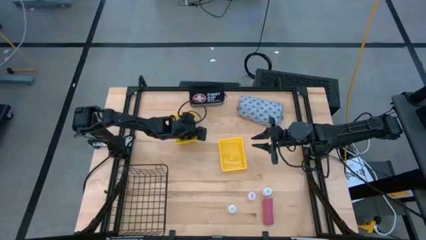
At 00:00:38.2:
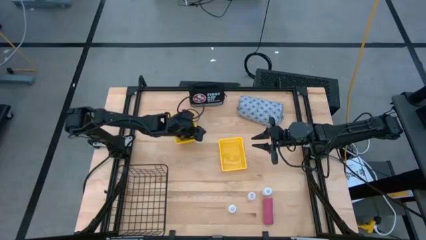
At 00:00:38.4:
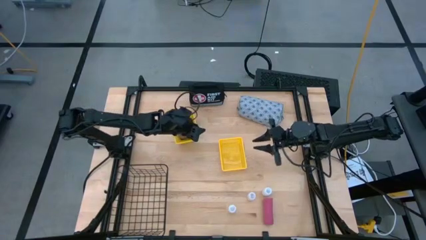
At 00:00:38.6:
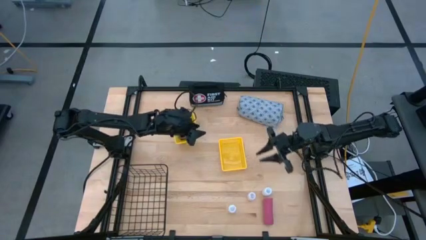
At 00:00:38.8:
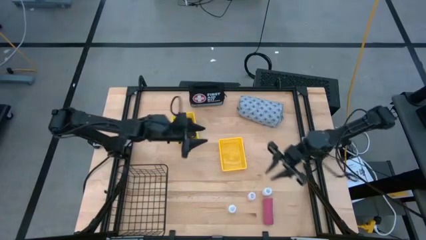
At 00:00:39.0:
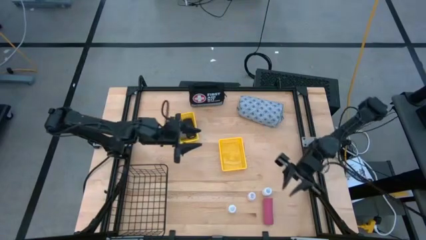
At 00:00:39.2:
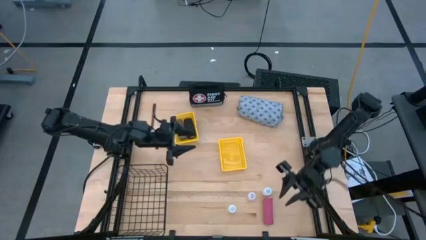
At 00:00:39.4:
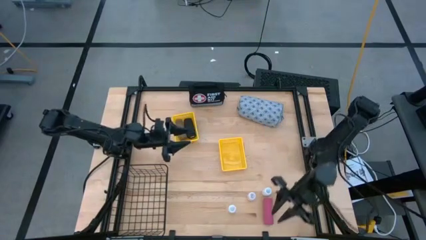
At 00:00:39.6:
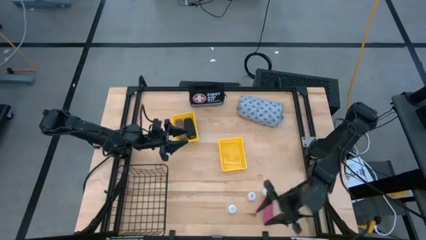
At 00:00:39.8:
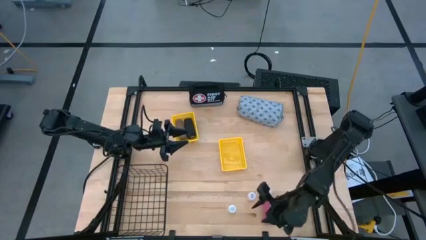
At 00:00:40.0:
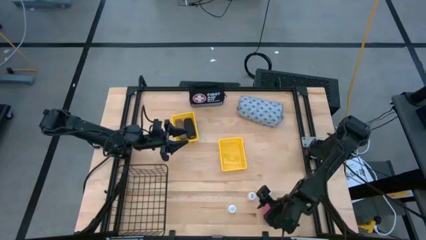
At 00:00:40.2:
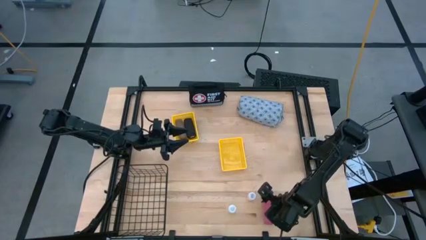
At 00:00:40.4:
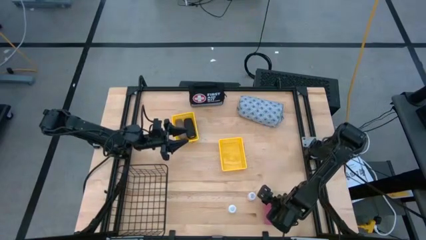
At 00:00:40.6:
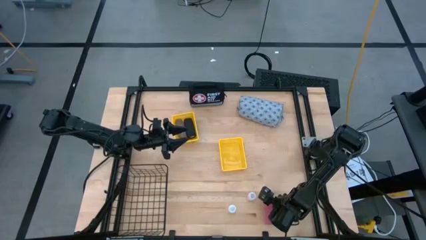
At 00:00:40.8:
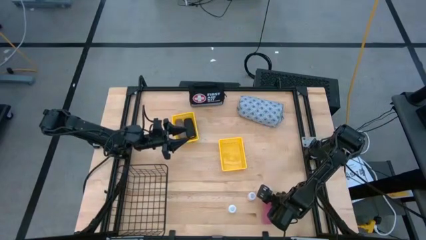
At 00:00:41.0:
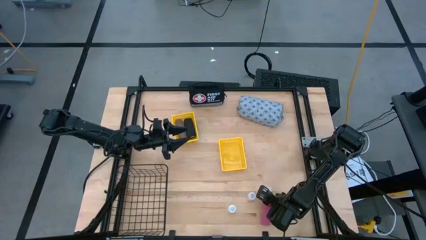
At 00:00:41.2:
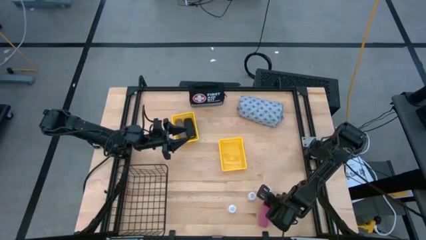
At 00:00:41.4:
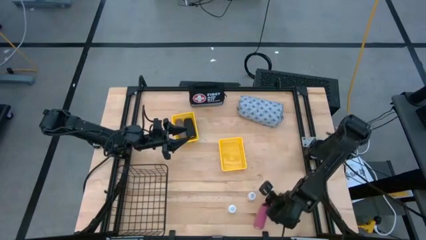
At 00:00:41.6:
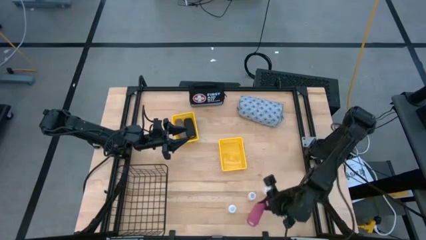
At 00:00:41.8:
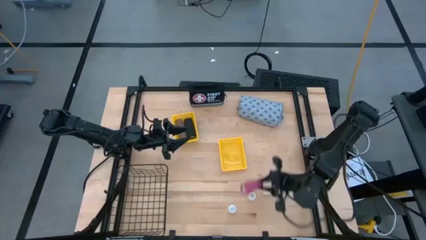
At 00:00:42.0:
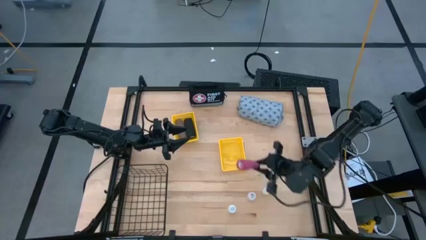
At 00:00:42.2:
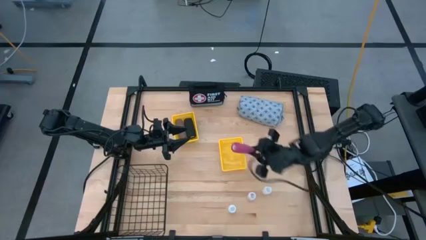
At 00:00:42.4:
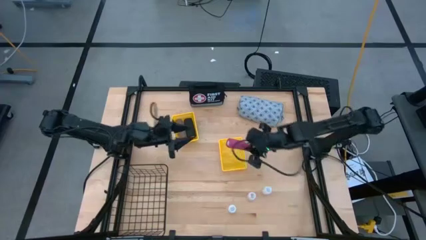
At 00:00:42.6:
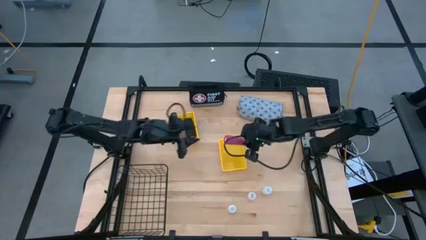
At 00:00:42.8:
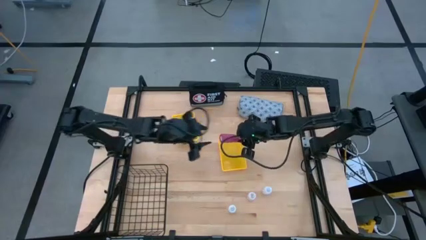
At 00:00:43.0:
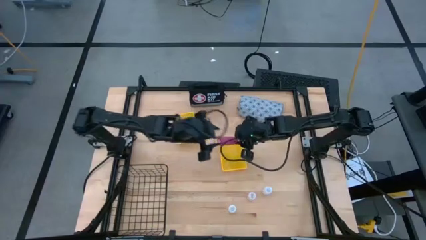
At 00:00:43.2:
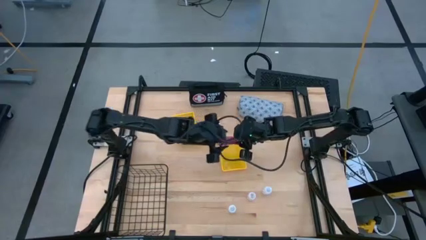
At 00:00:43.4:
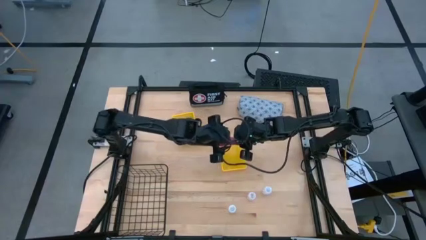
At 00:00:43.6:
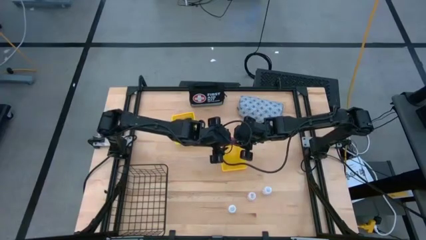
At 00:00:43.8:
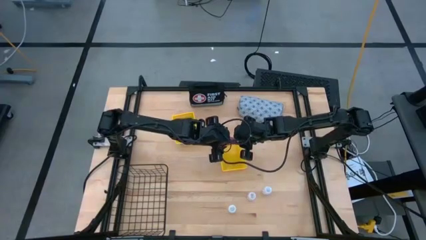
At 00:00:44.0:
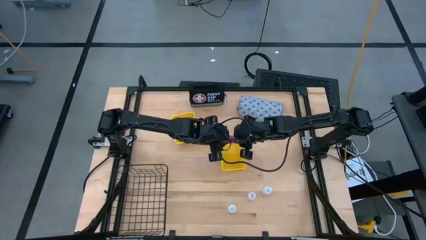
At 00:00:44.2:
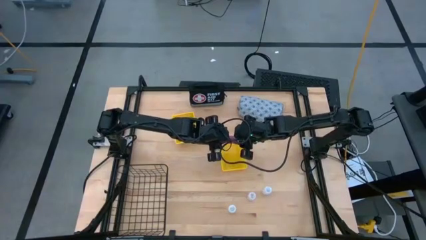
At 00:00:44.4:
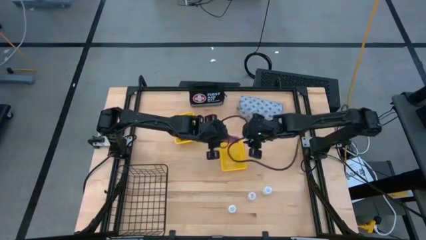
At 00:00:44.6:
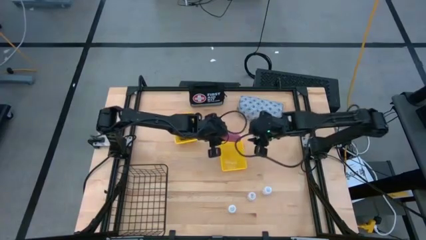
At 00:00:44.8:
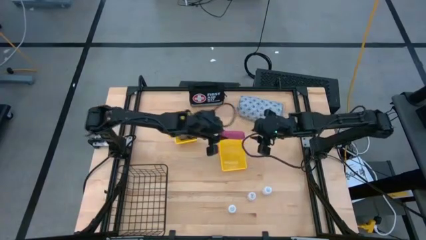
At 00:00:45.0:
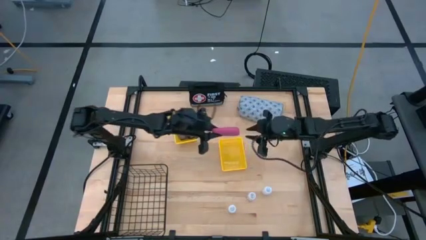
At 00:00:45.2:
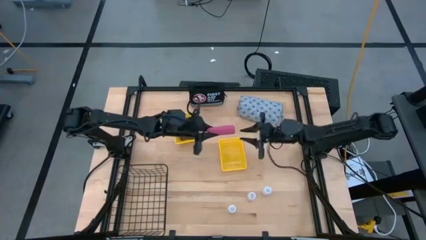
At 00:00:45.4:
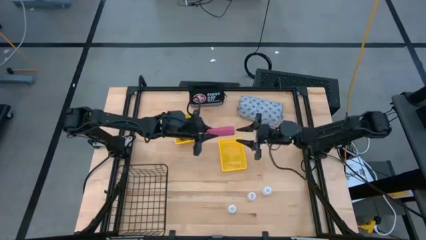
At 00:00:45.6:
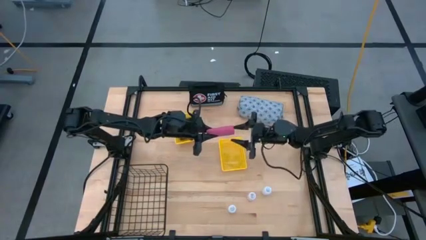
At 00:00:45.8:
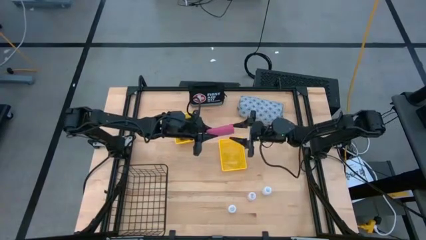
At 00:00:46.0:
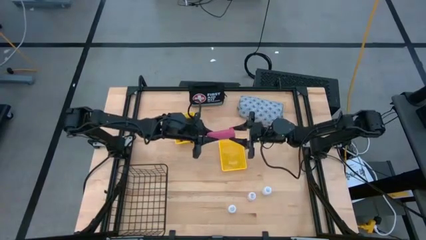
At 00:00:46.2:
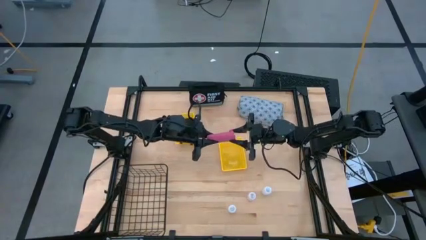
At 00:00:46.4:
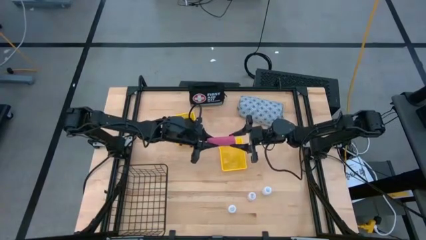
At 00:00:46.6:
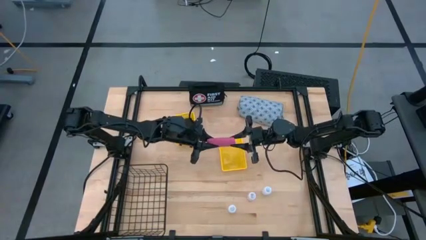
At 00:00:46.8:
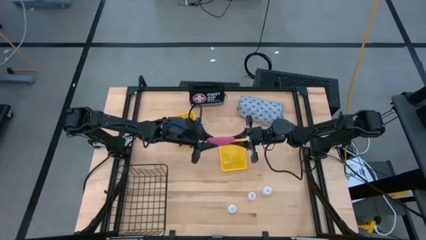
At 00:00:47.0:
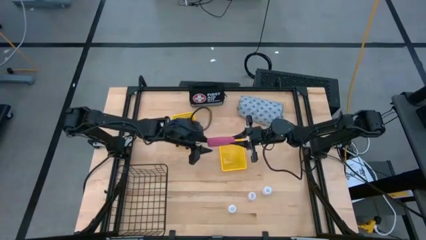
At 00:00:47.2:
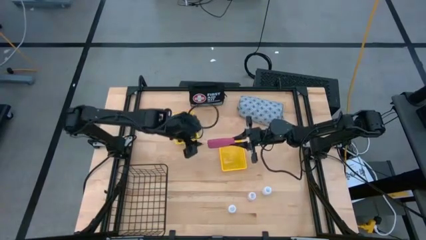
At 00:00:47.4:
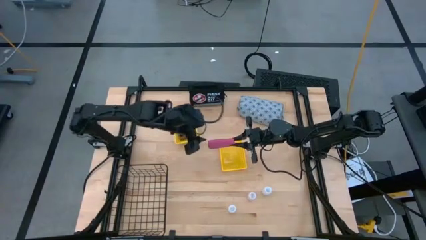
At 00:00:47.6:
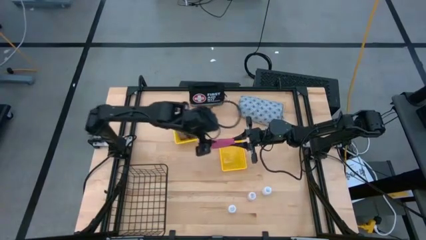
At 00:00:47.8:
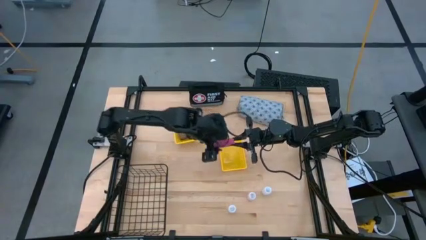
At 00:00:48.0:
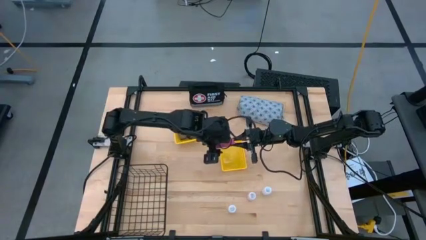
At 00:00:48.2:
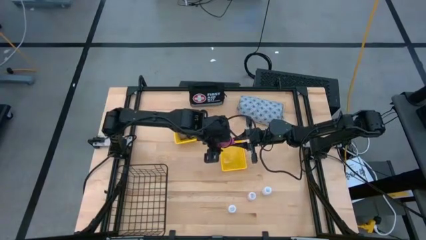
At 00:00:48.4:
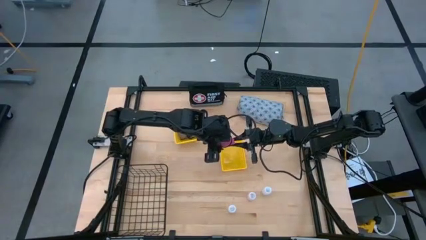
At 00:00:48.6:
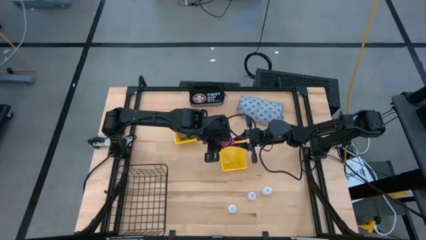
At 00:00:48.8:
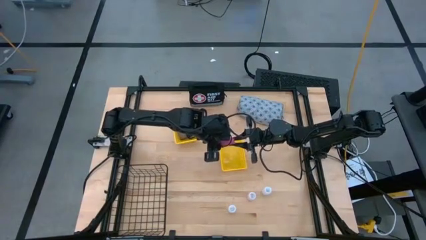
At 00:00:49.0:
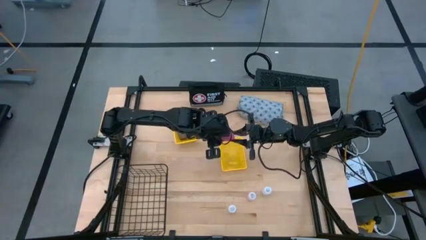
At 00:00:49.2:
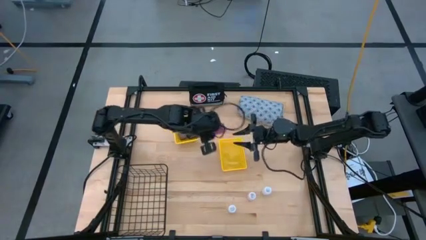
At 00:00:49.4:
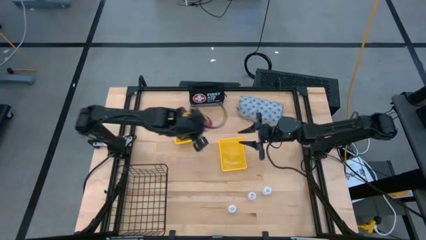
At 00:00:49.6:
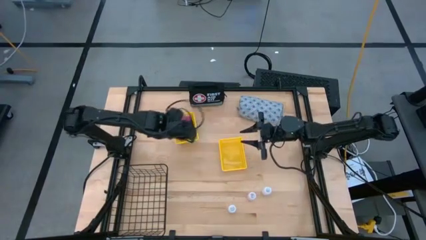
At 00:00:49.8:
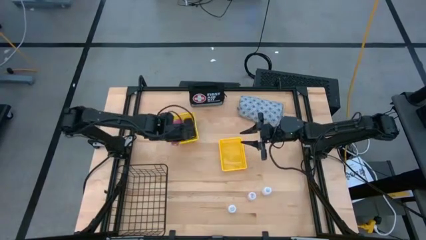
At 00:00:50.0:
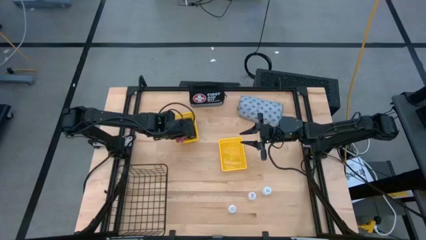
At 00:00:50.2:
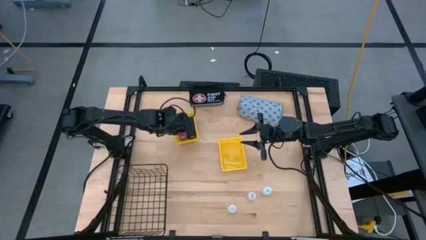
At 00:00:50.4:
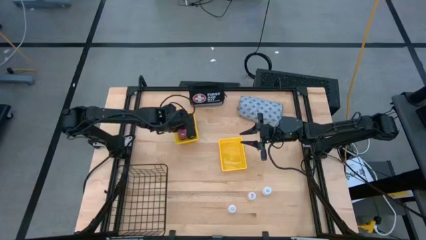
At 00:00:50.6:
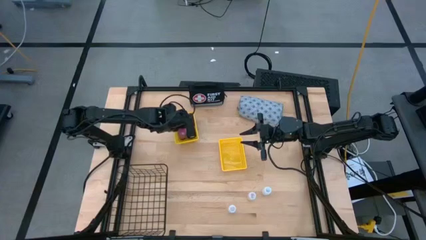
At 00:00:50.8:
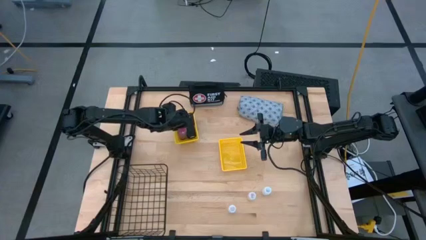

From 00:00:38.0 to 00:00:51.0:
Task: Pick & Place Medicine items
Put the pink bandage into the left yellow basket
